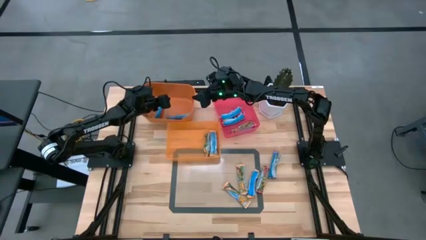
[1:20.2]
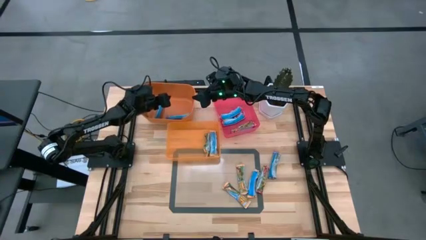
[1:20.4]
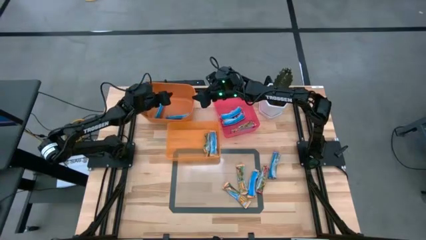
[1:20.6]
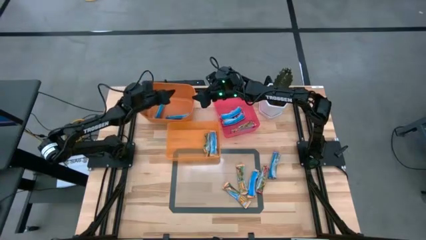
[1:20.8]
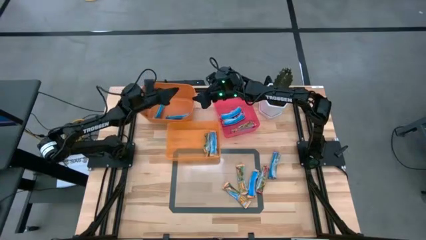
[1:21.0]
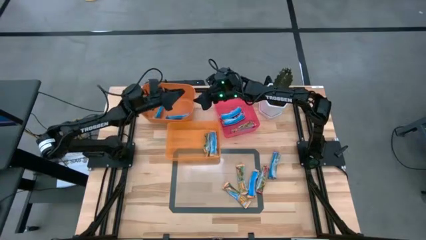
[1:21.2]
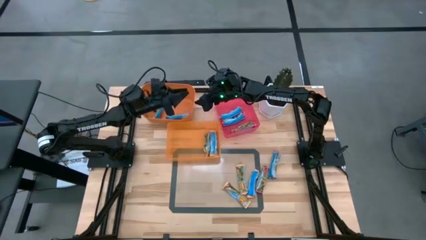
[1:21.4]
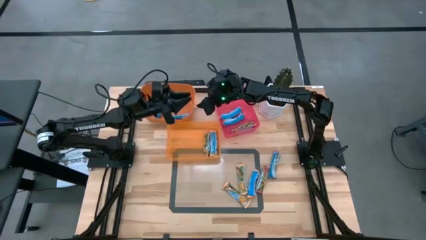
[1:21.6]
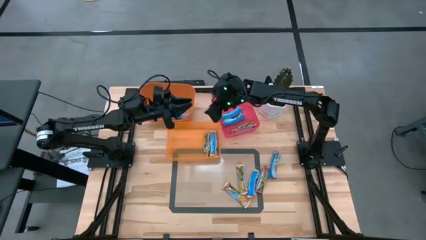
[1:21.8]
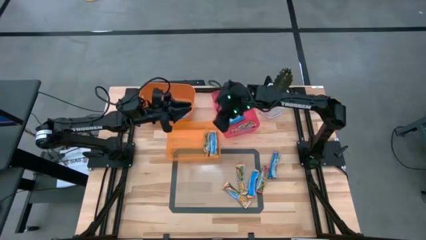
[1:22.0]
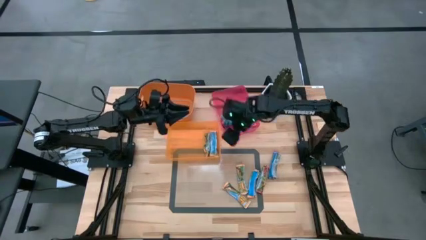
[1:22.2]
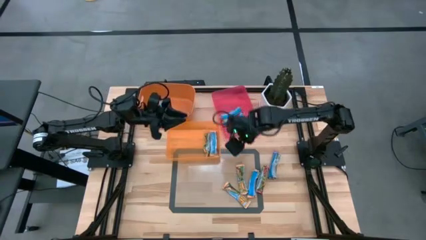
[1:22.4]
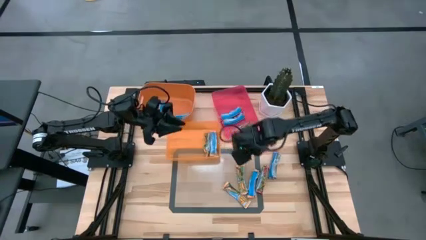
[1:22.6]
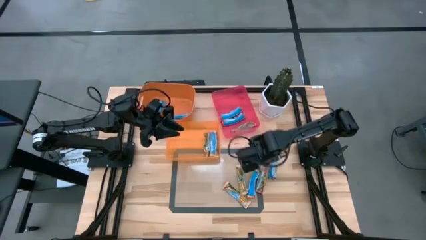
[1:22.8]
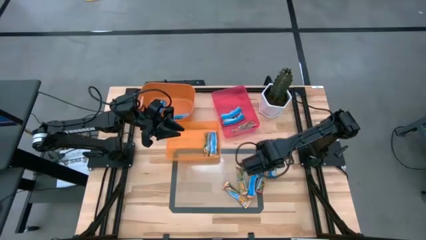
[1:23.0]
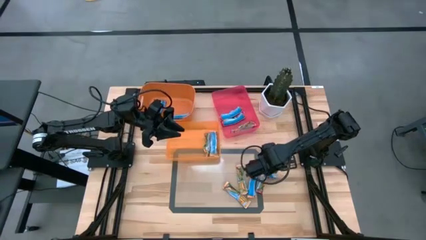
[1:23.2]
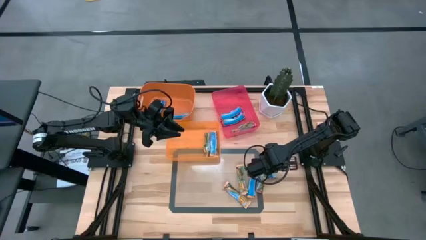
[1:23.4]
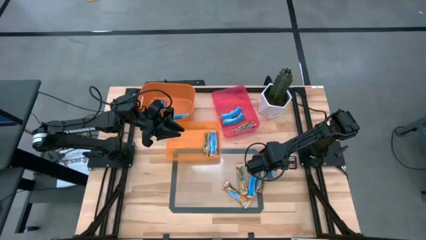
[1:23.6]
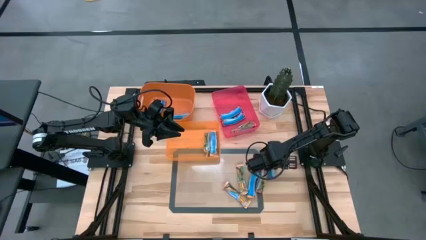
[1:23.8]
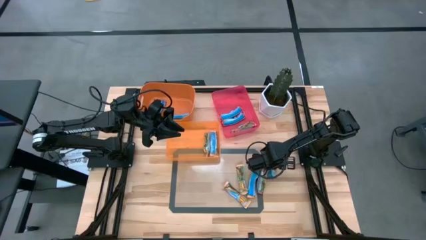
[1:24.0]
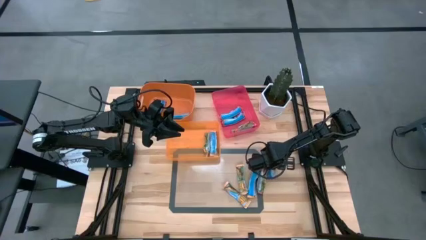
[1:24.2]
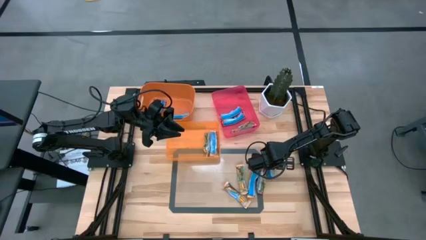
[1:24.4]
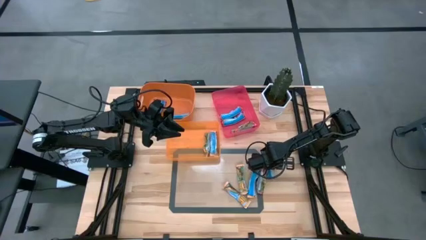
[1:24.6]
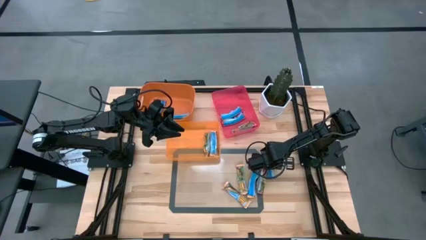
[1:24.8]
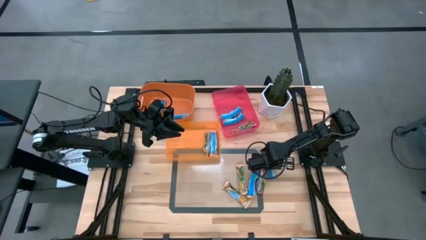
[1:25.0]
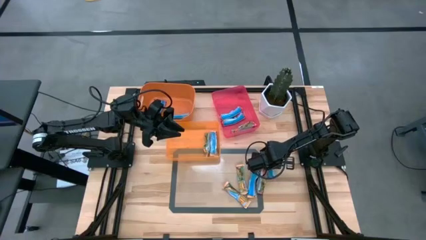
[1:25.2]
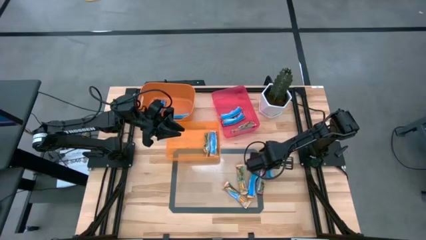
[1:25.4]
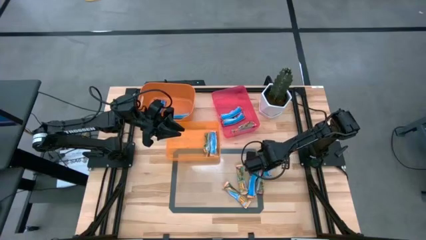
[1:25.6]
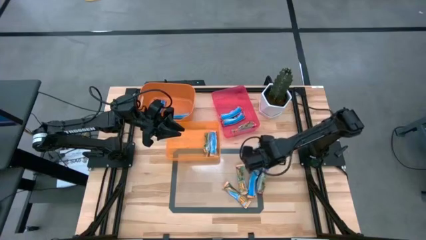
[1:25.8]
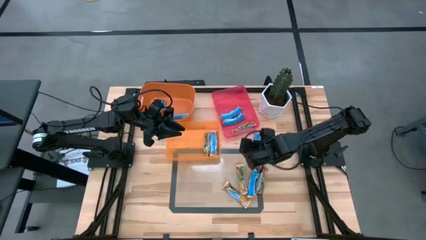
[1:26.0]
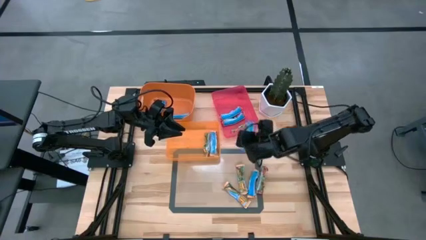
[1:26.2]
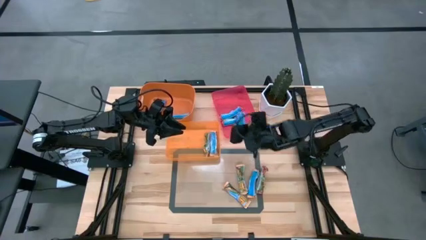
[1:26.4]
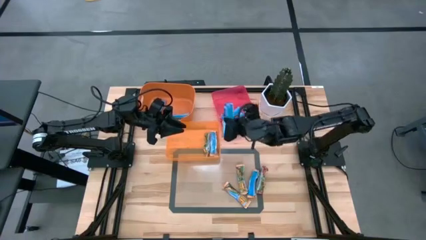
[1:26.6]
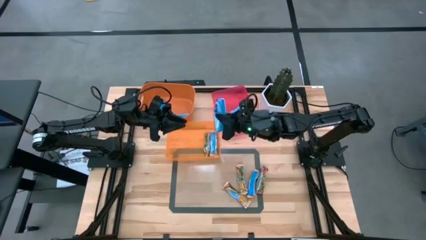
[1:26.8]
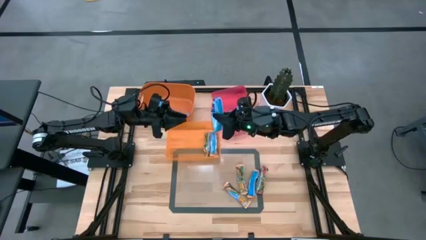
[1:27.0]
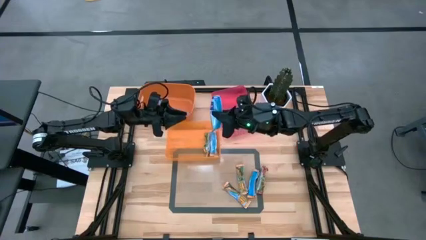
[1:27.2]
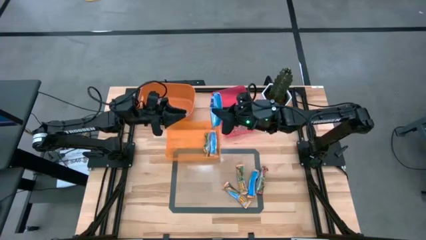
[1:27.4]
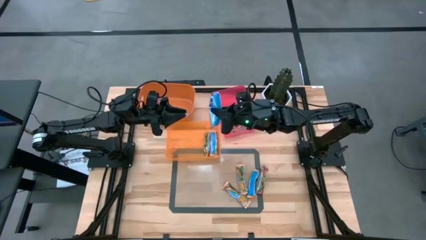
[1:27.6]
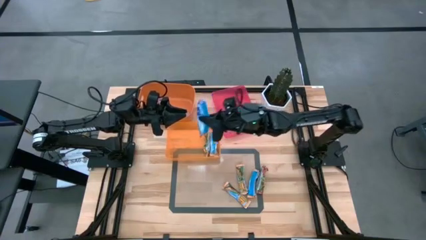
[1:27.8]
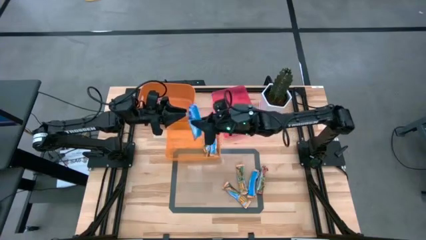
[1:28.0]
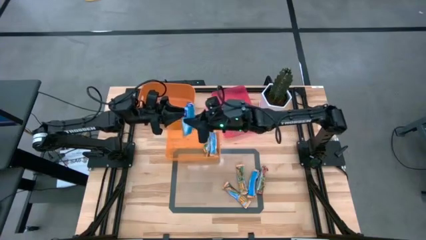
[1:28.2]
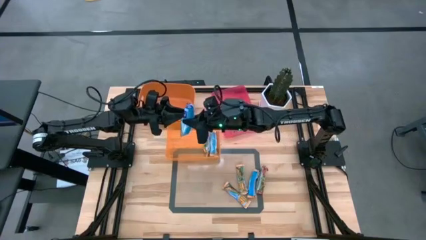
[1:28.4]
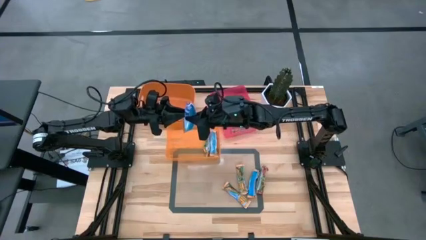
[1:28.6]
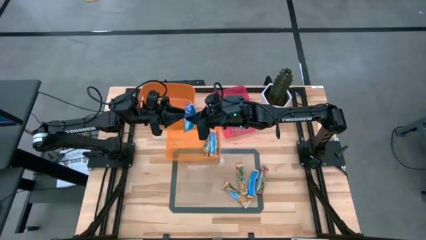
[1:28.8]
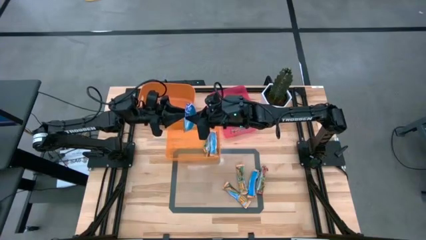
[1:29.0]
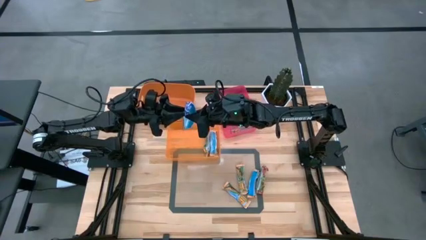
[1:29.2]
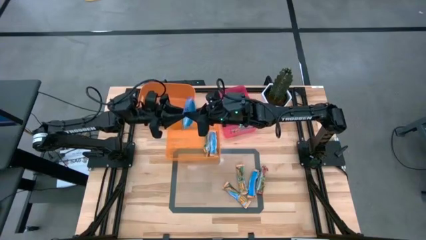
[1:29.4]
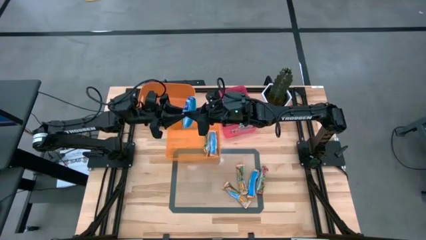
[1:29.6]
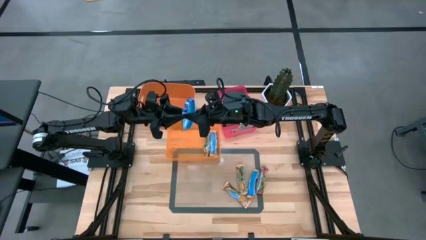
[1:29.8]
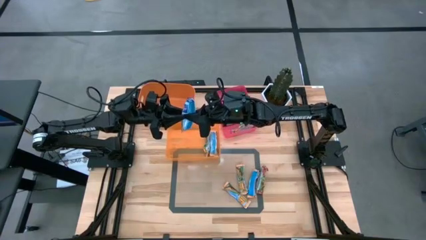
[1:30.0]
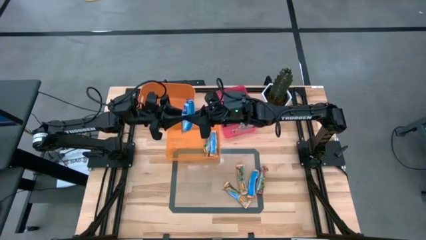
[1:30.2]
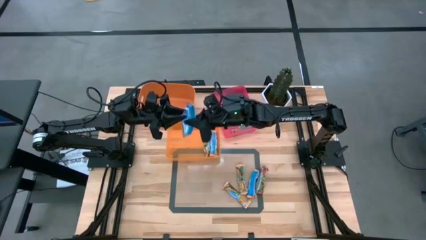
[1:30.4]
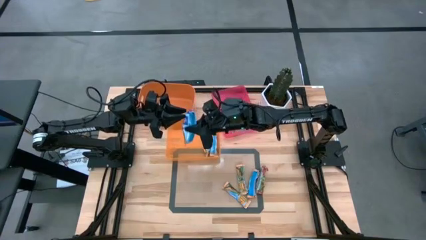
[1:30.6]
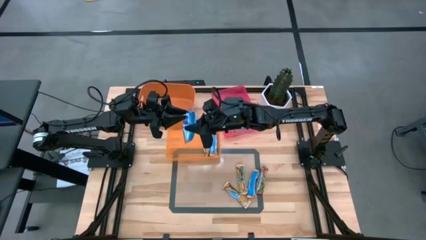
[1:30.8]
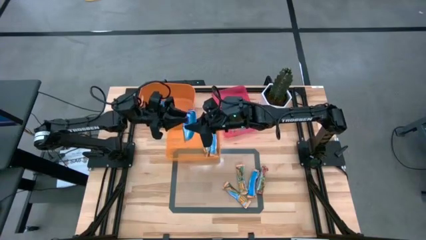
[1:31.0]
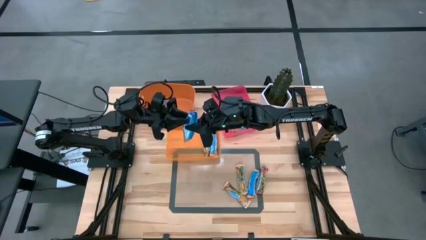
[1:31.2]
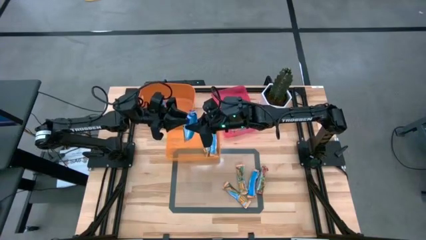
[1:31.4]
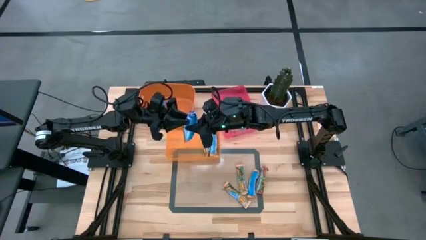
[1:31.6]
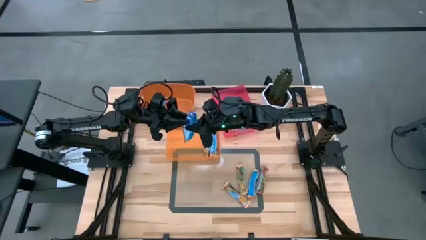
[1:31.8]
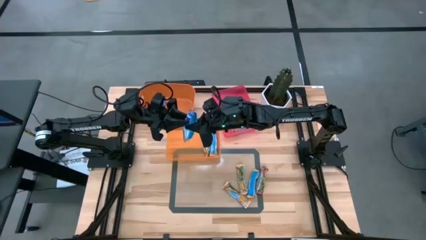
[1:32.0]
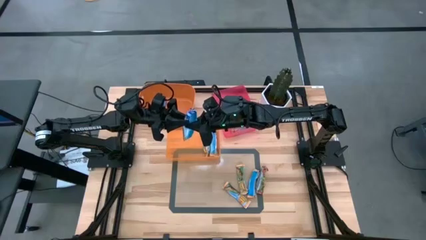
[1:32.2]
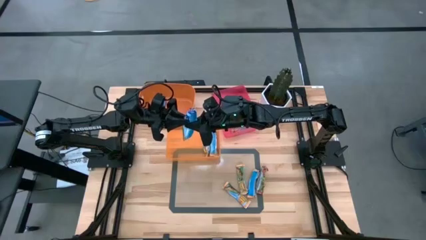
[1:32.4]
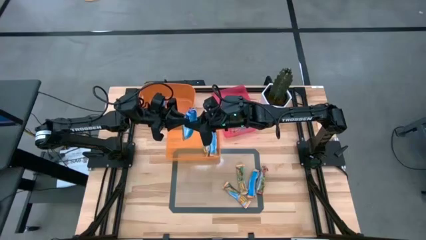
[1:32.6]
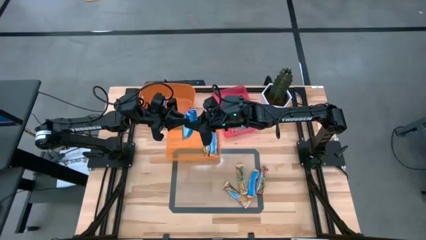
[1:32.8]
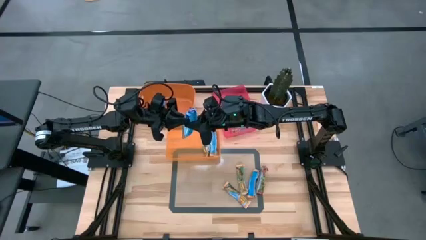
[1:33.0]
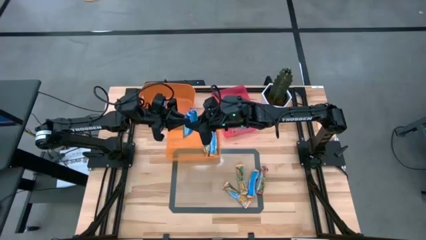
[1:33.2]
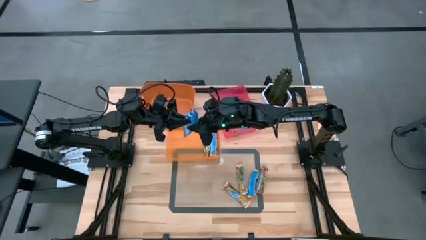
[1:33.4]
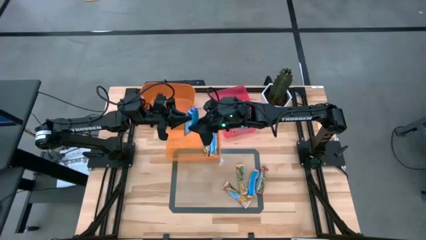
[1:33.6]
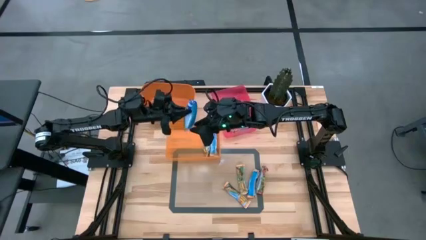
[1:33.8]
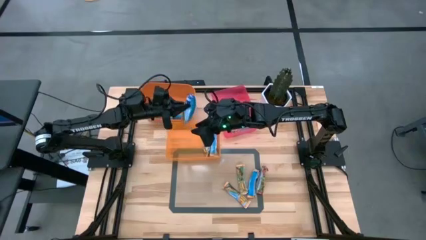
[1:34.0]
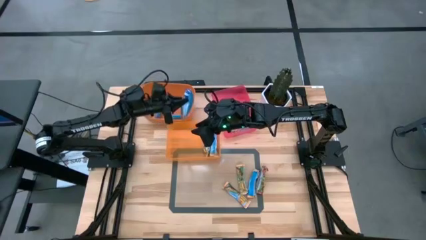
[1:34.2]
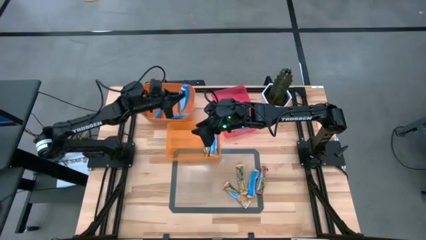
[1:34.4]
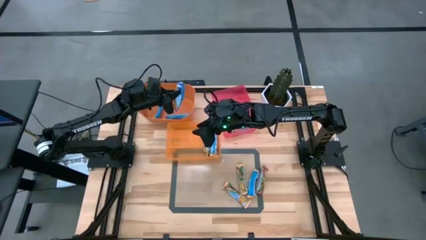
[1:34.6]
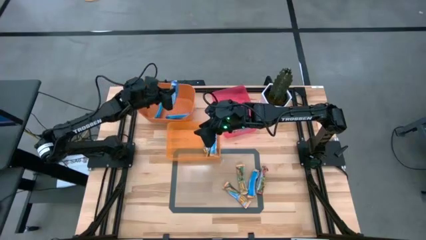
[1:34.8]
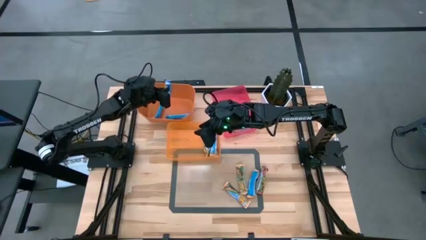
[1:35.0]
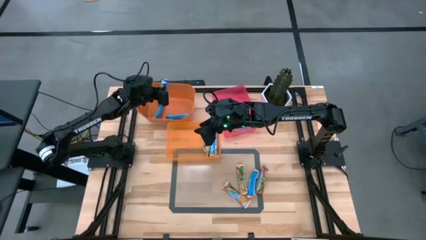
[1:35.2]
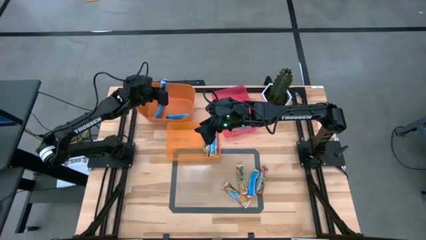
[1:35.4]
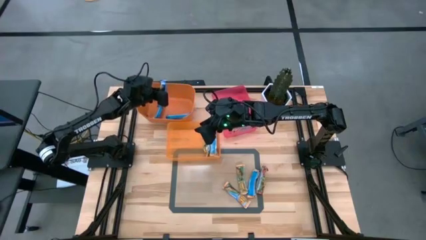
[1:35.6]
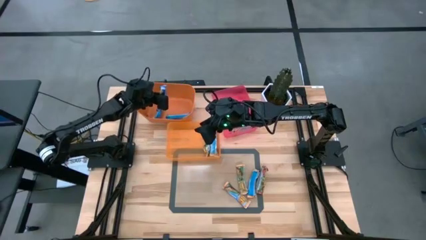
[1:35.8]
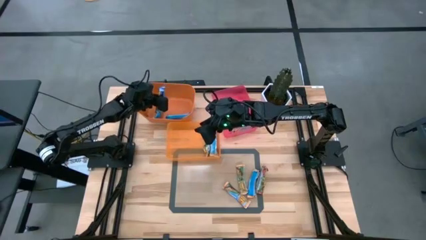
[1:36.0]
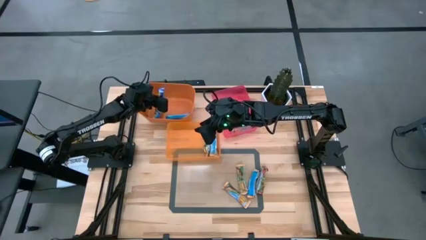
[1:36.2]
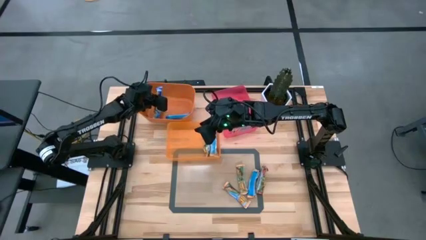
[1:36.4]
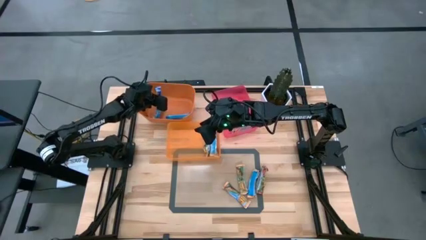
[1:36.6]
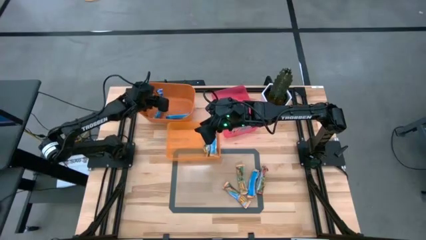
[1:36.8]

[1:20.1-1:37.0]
Task: Pick and place Granola Bars by type
Put the blue granola bar into the top orange bin
